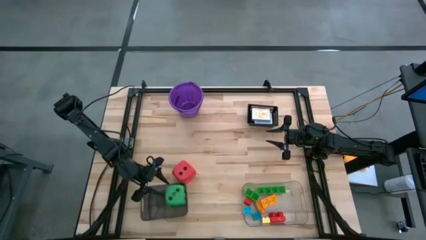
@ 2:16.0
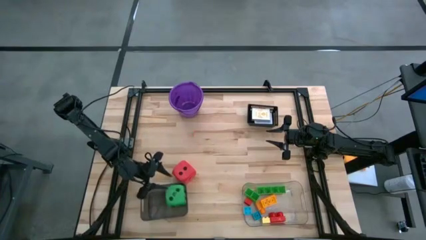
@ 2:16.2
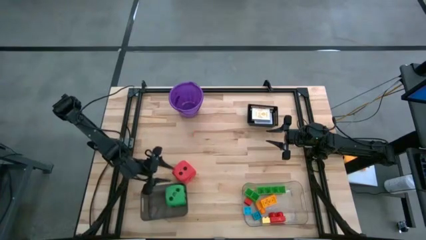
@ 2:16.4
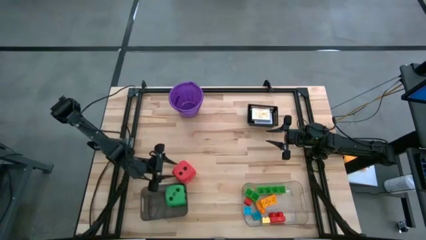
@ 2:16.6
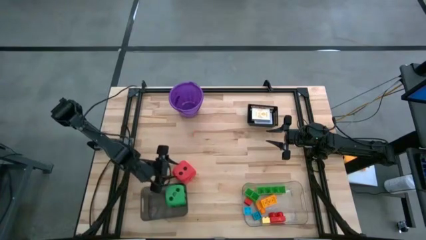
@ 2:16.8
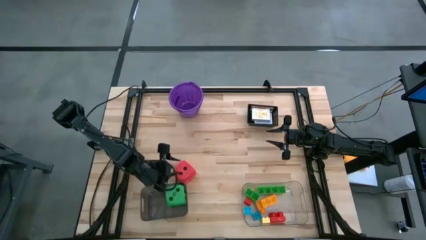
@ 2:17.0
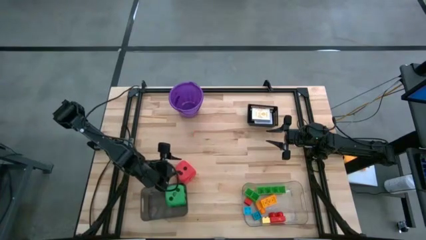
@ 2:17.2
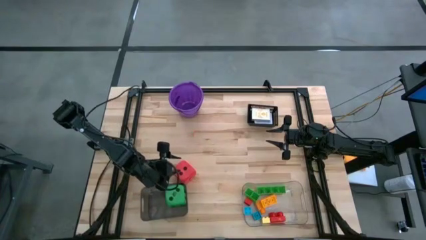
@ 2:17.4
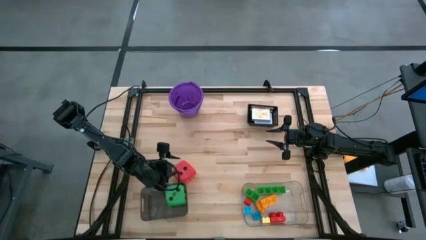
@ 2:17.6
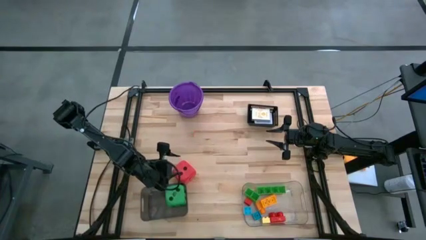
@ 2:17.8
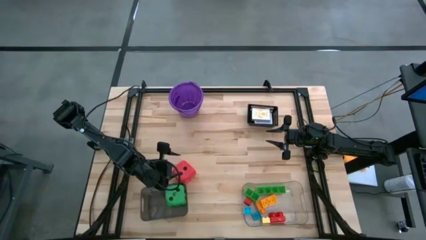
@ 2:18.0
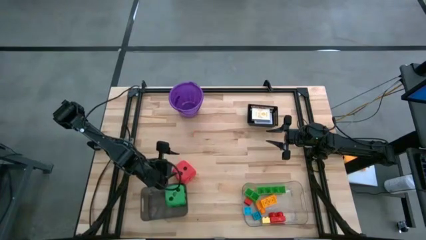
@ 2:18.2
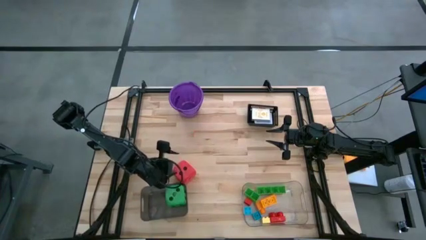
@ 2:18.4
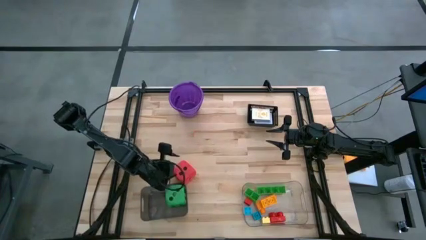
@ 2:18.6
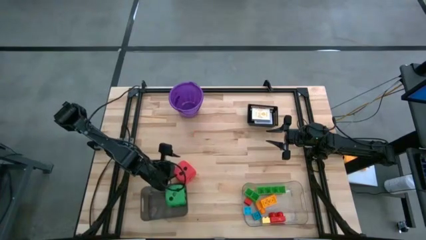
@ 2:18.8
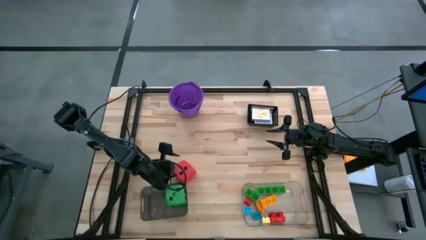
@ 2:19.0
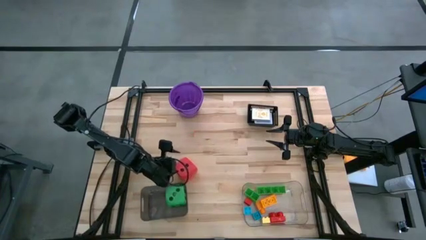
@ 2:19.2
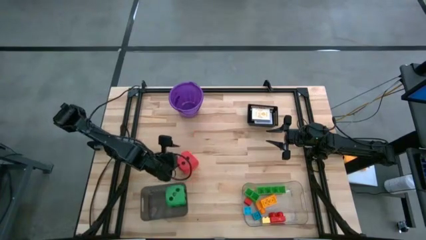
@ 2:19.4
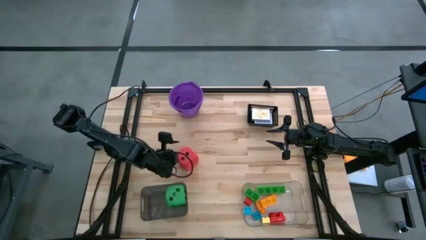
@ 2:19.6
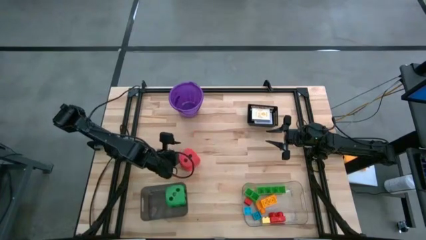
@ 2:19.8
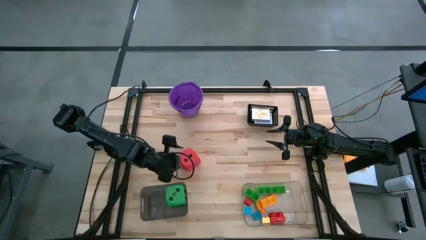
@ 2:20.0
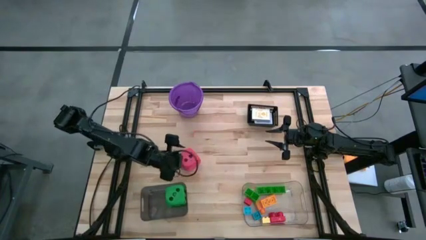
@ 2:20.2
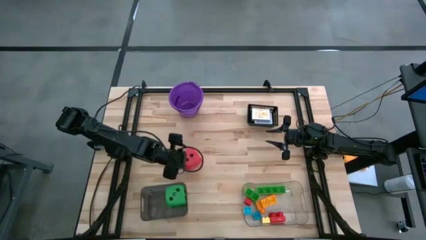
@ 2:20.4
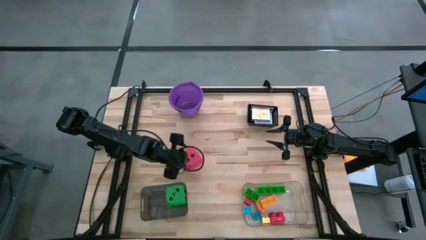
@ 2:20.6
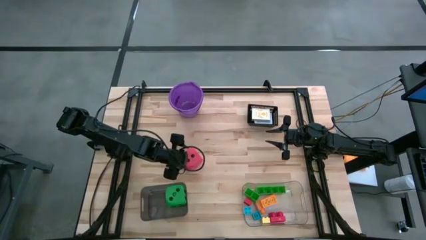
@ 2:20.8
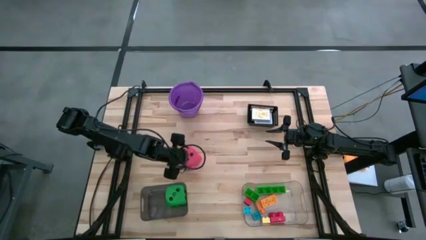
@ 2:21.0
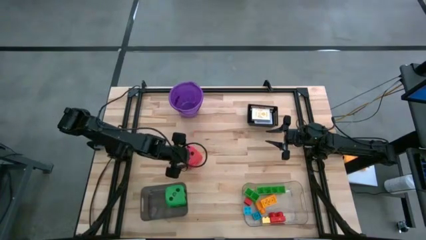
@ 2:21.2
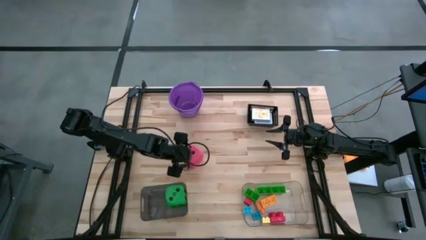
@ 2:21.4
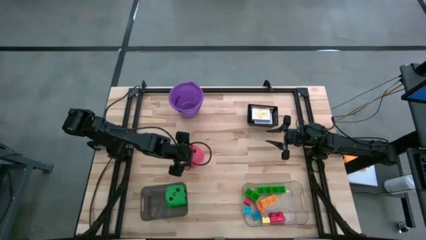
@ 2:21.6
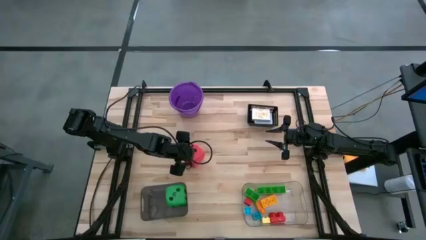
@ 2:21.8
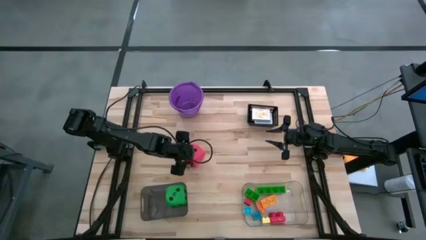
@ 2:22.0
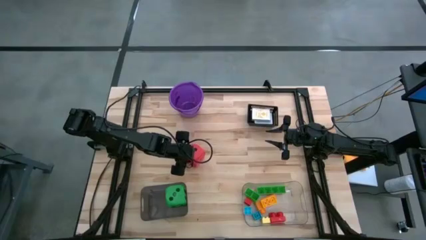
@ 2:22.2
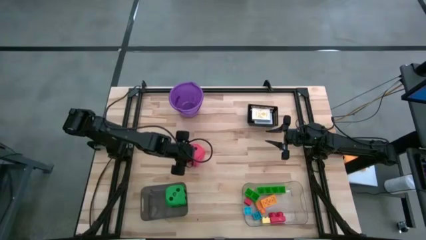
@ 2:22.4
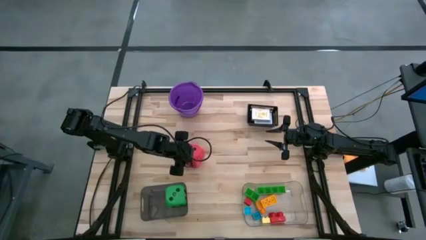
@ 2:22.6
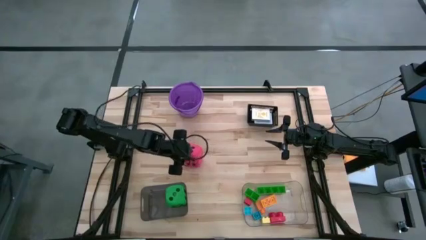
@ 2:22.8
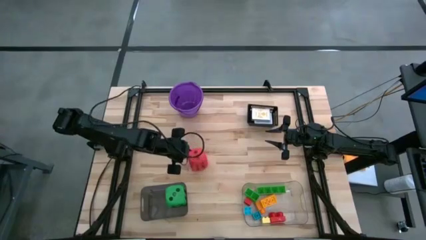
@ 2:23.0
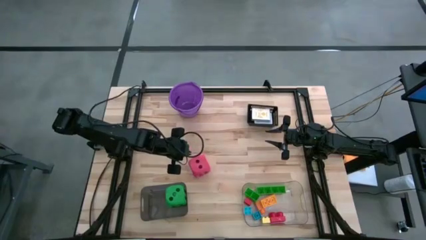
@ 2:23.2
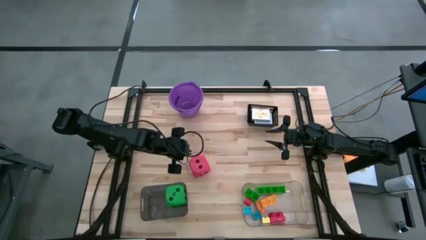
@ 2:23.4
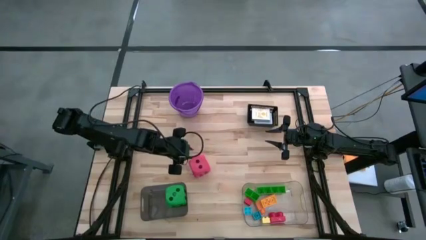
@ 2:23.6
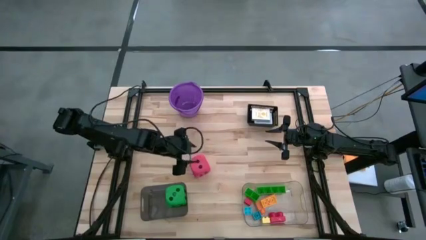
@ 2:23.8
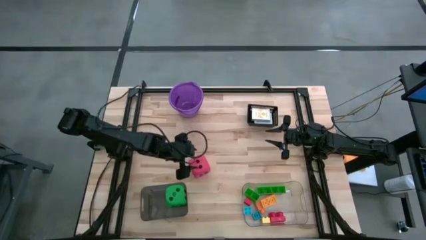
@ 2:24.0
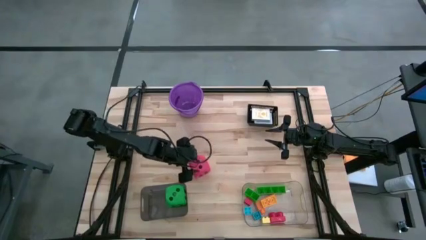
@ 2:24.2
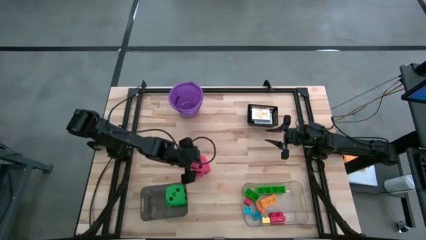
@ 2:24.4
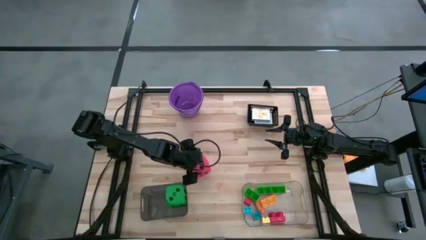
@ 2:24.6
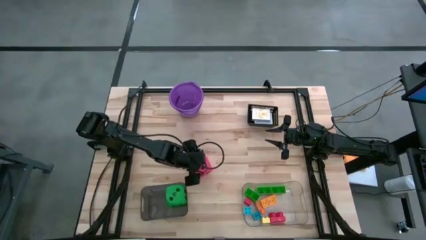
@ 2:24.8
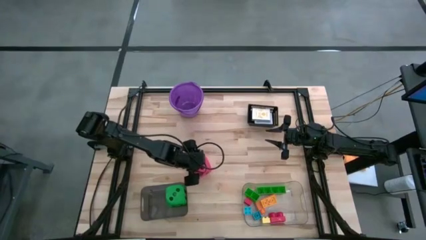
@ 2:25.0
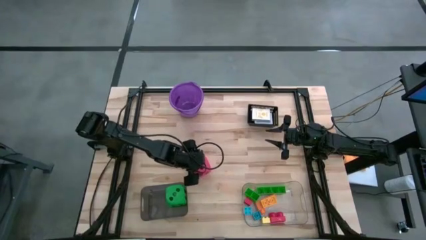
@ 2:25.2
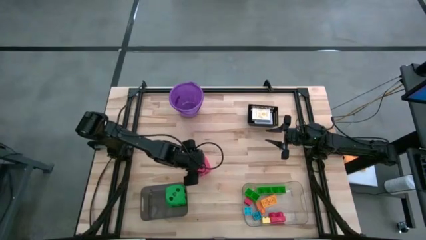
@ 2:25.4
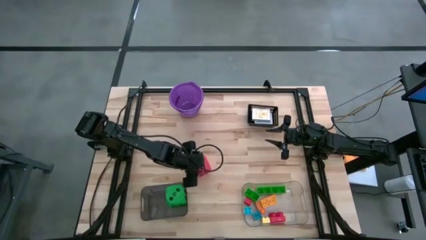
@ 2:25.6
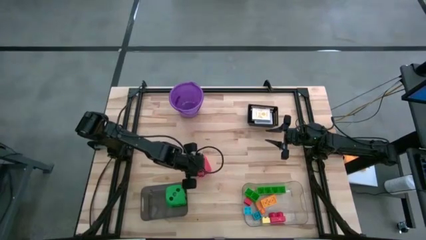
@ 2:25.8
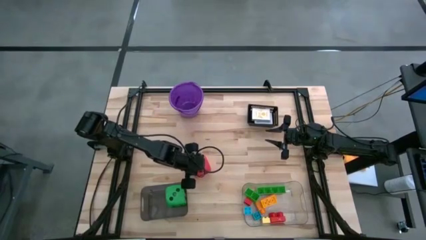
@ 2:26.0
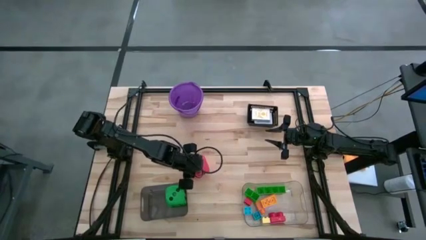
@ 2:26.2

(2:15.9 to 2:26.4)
Task: Pick & Place Toys
Put the red dice into the black bin

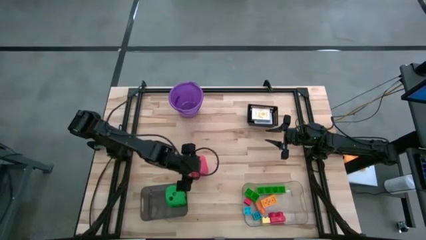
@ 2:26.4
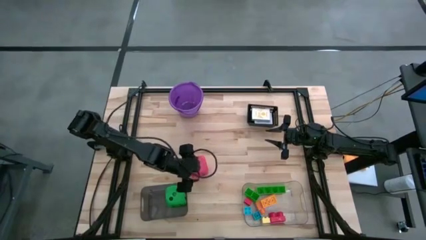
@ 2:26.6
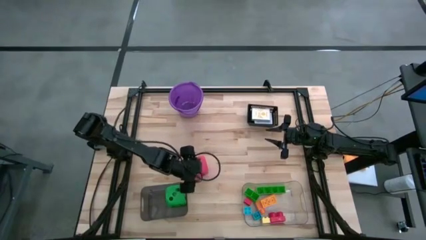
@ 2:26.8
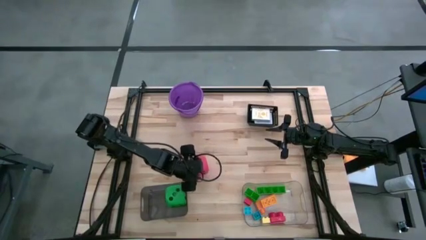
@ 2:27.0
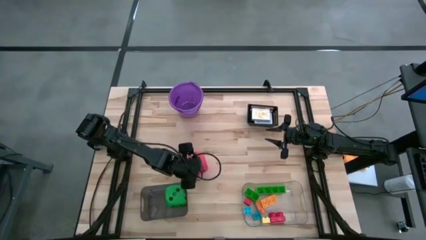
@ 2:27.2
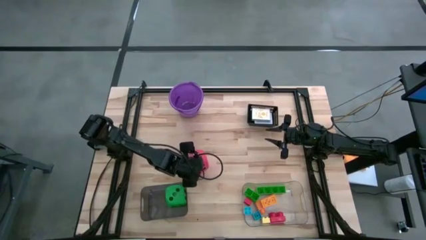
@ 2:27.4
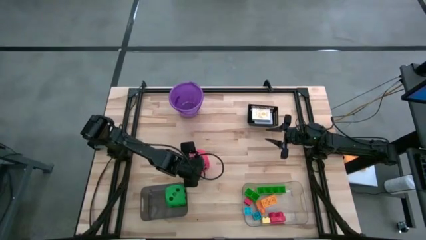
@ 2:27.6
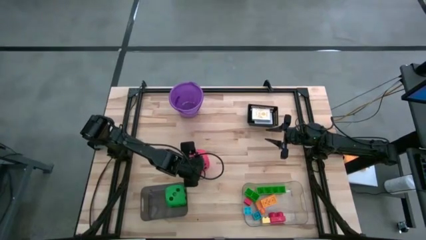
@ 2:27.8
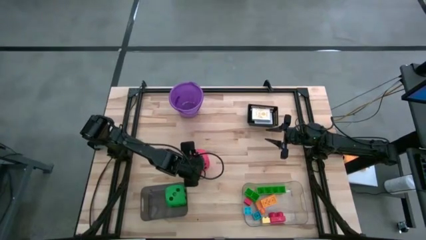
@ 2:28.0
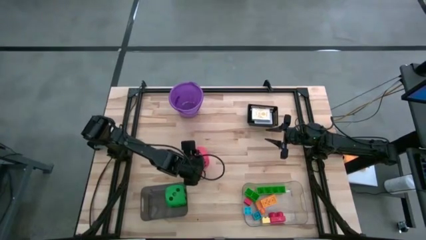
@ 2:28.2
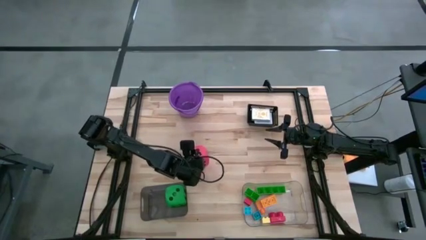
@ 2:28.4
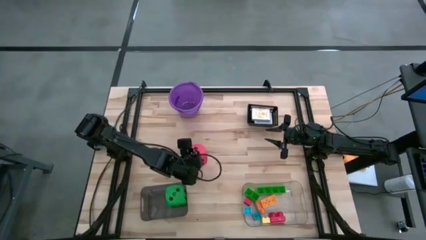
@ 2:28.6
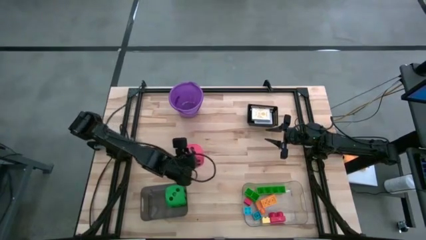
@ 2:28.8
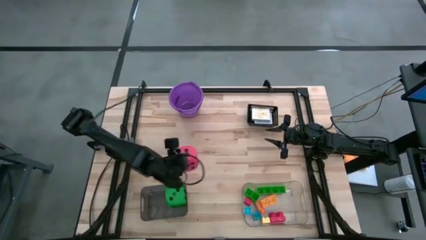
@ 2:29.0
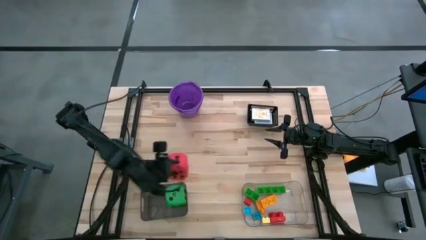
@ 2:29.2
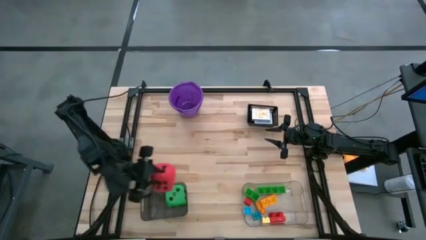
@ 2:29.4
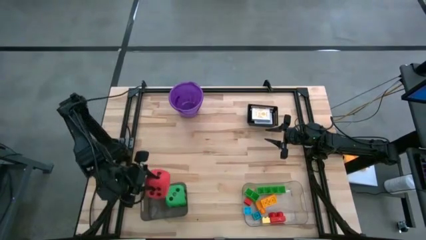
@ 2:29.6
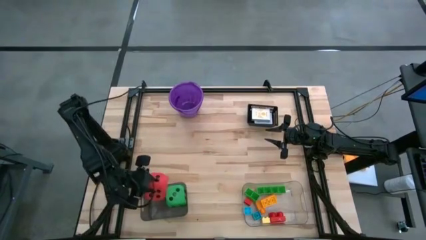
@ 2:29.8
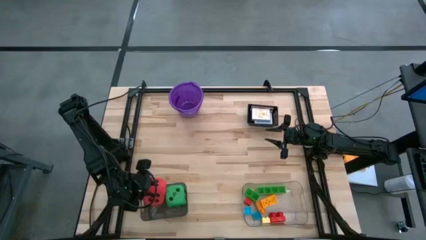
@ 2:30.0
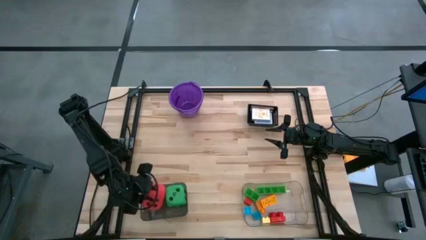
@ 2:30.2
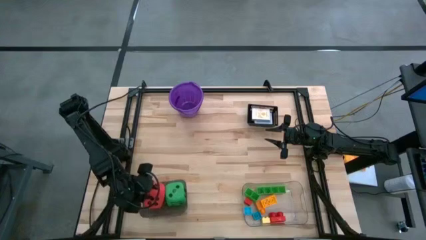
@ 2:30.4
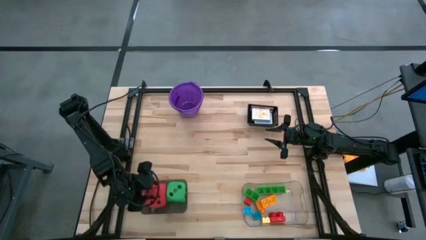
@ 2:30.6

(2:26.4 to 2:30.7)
Put the red dice into the black bin

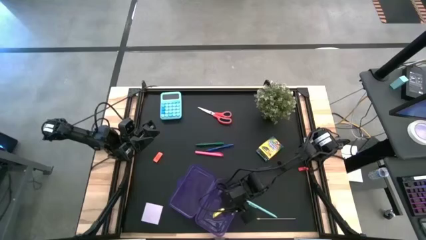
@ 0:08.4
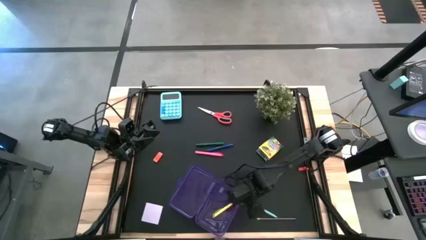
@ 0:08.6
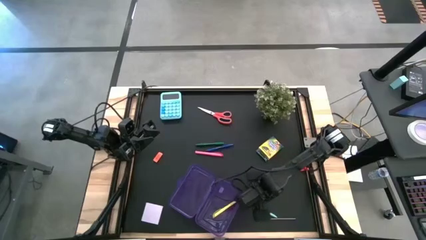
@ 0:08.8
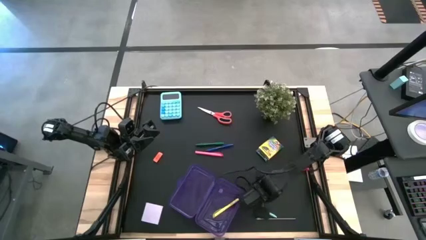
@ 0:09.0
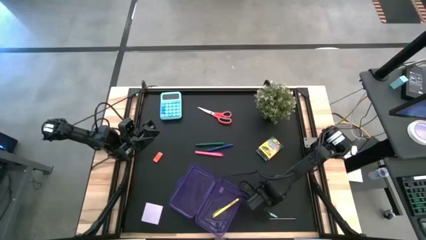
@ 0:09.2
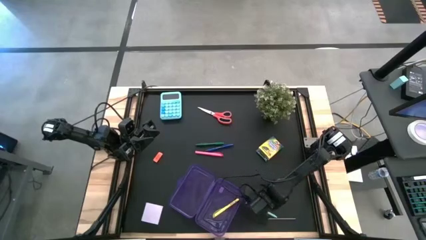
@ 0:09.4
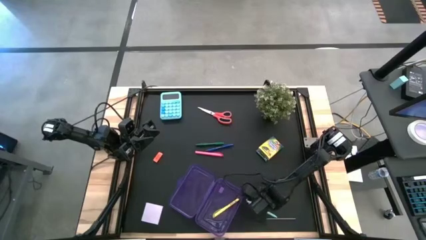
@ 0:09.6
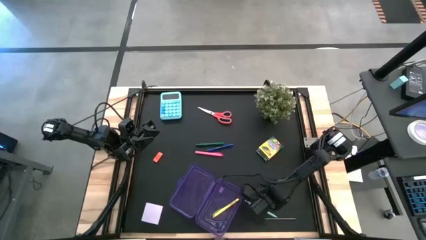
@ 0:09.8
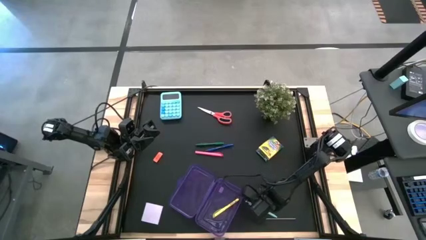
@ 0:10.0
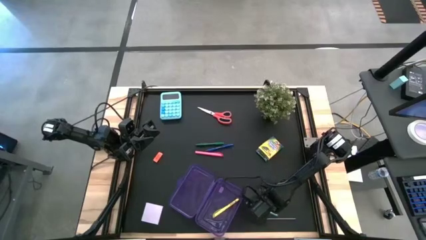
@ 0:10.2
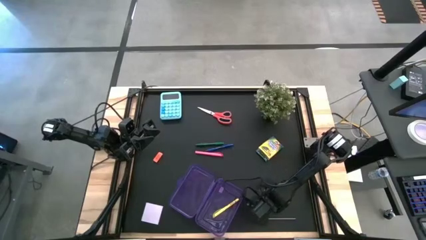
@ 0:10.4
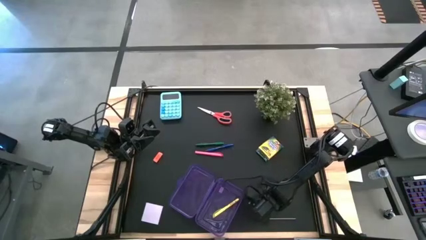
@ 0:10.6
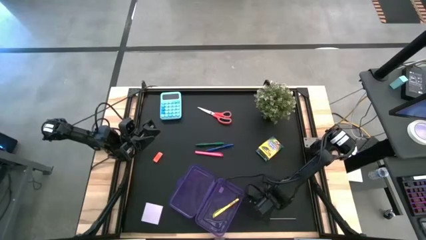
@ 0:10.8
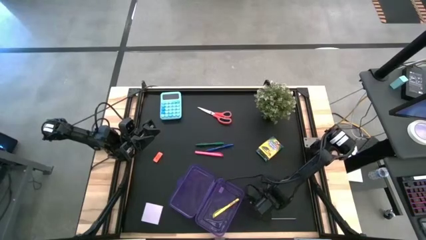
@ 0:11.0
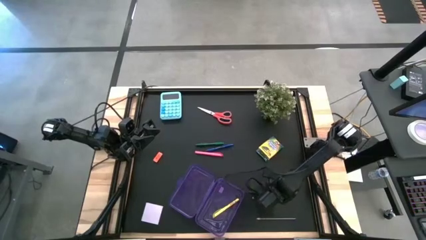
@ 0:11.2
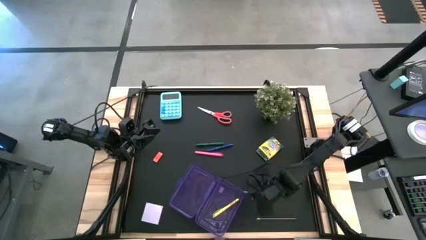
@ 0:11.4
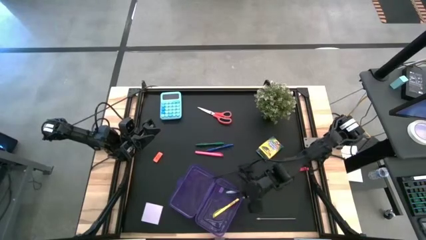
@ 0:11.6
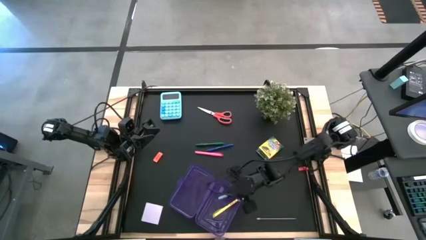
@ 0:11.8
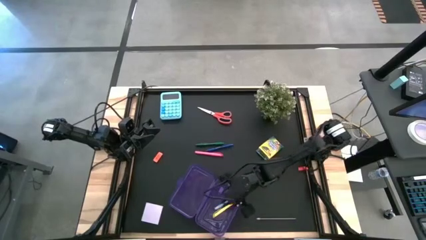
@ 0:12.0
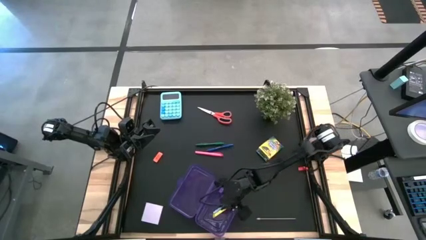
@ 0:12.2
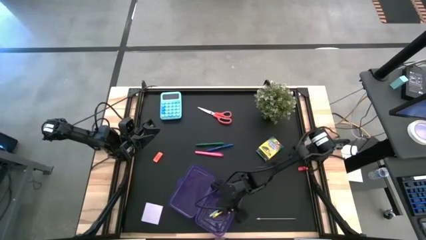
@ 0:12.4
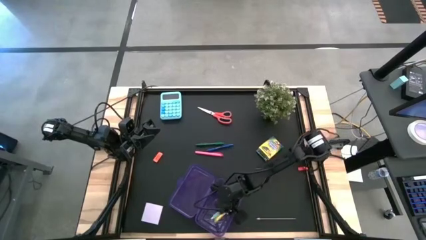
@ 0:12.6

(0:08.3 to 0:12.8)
Task: Pack school essentials
Put the light blue pen into the purple supply box
